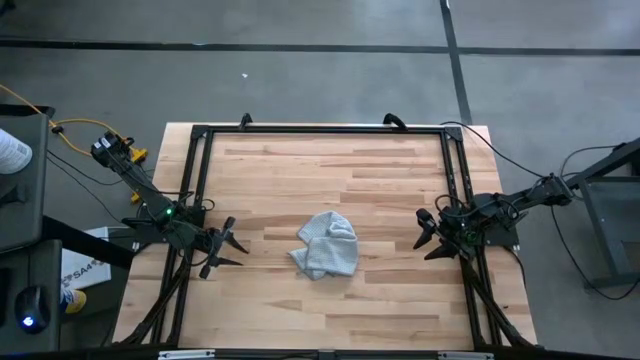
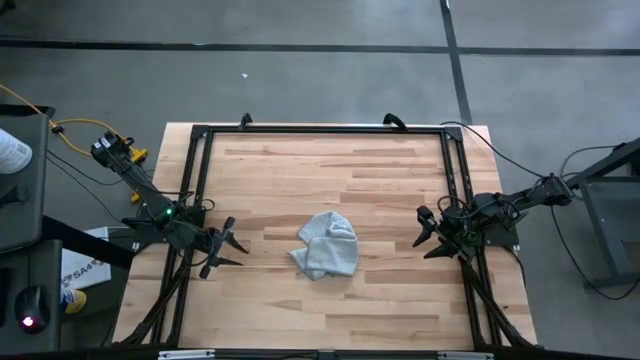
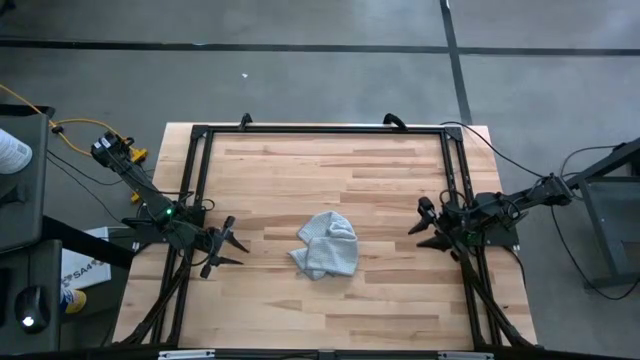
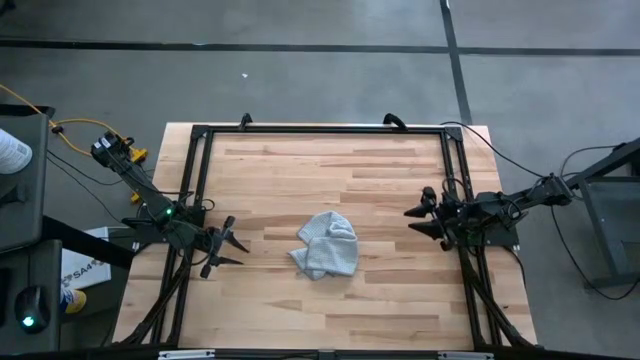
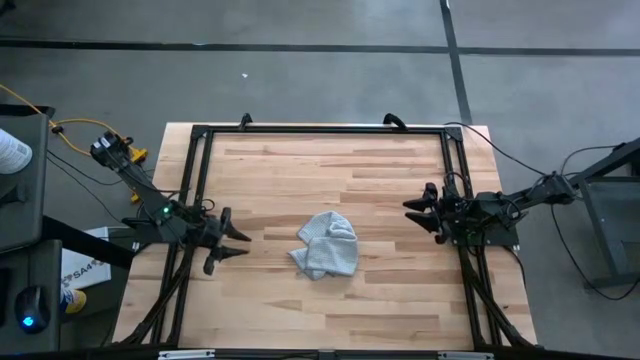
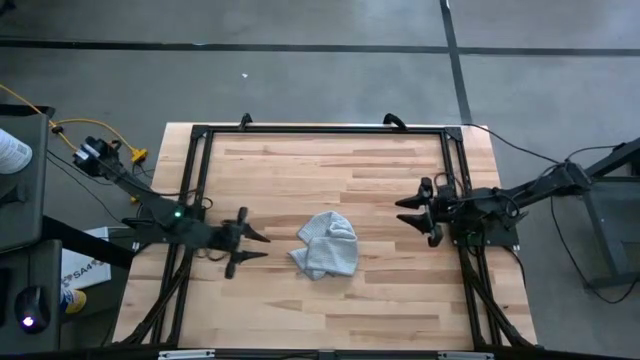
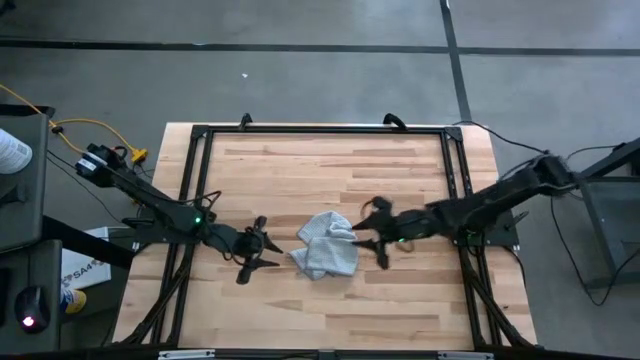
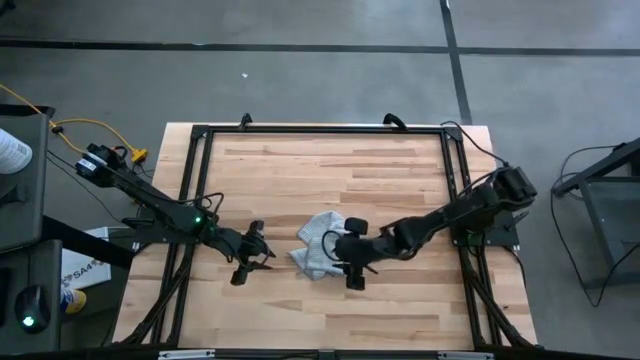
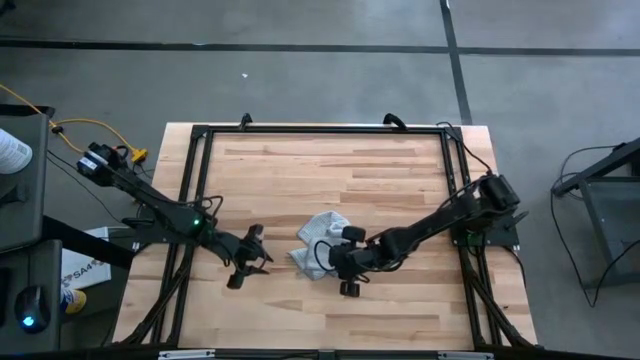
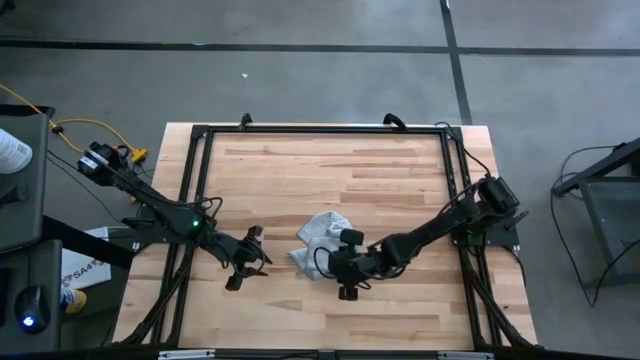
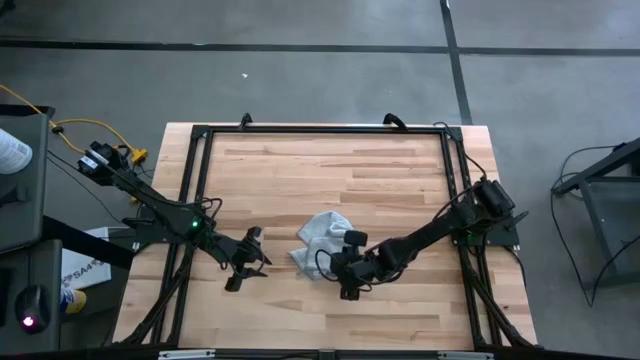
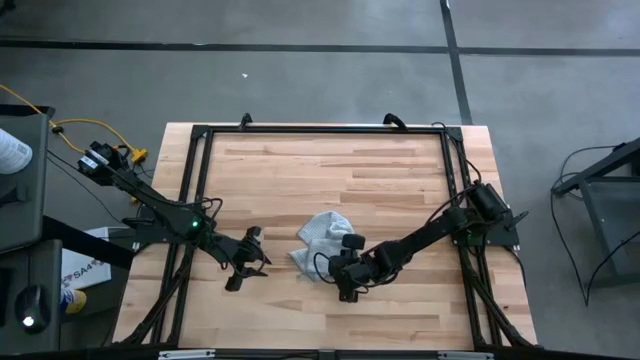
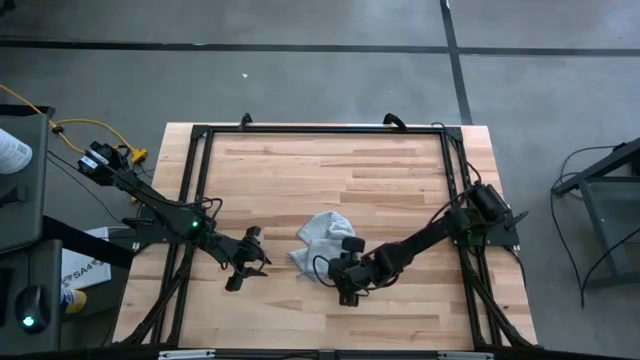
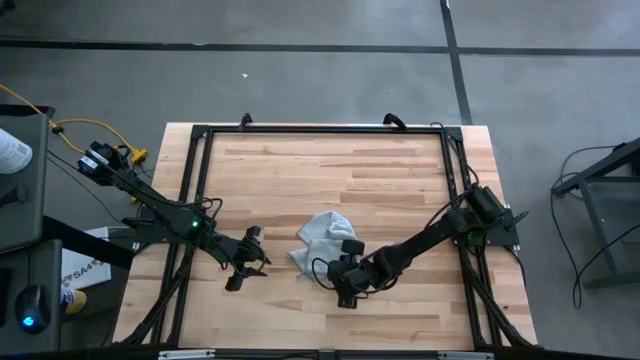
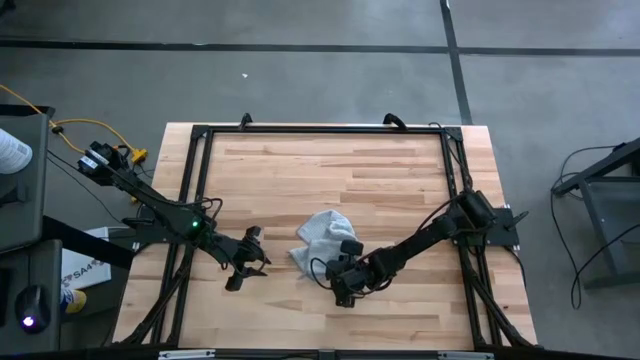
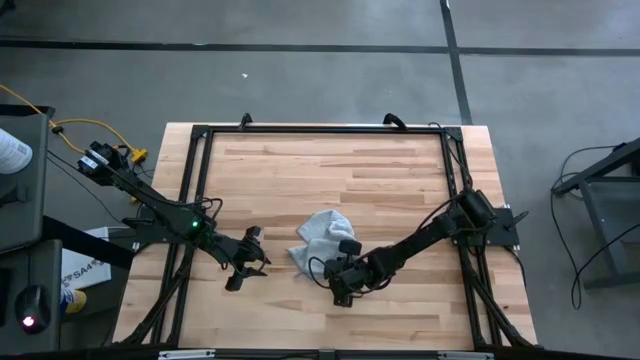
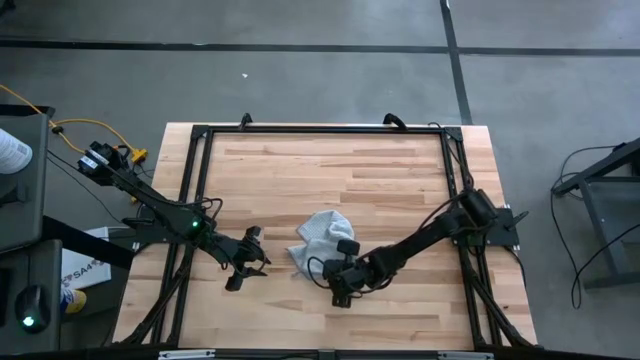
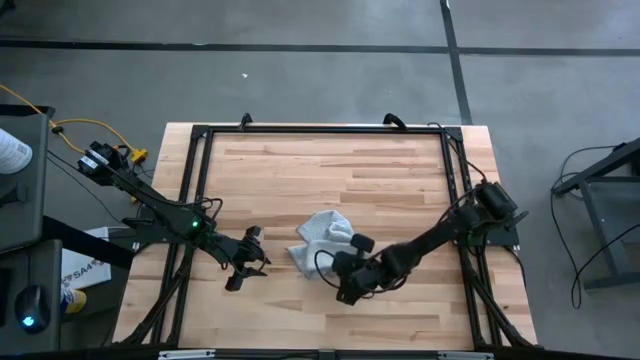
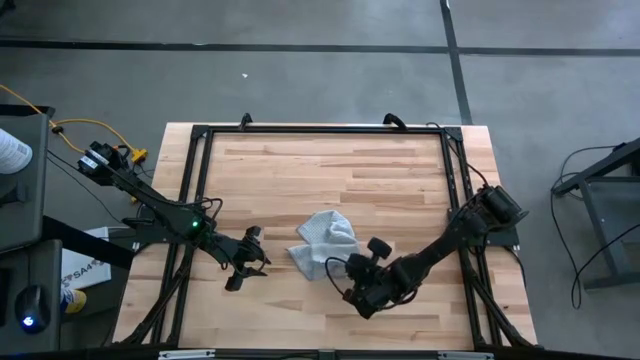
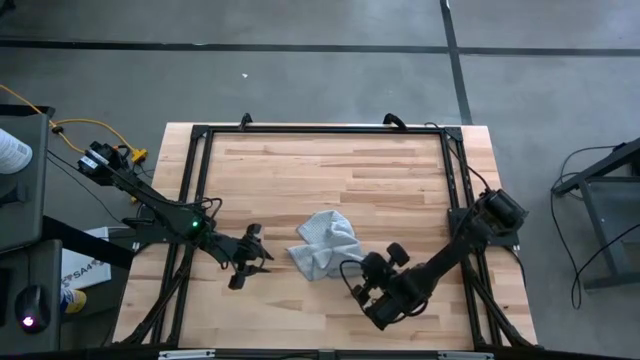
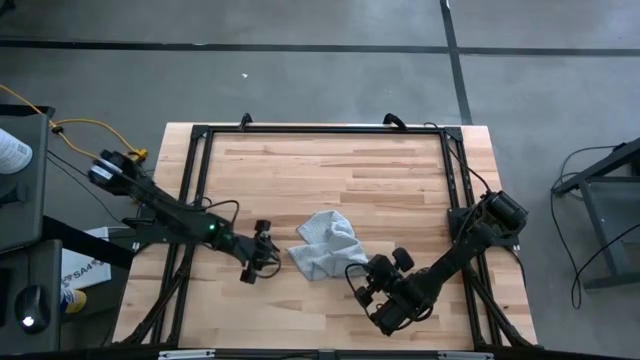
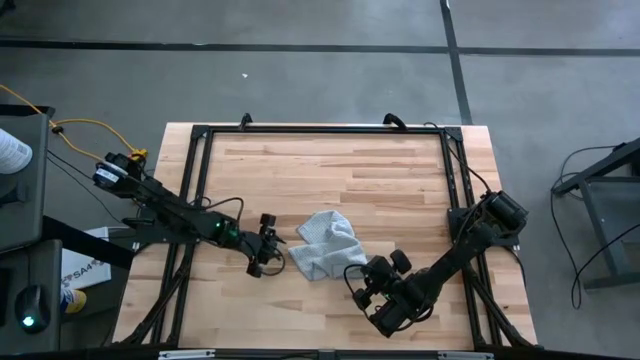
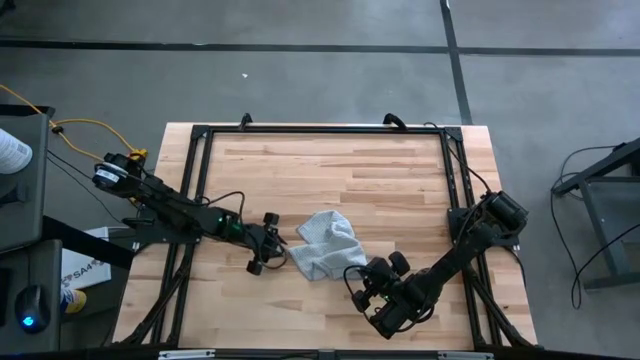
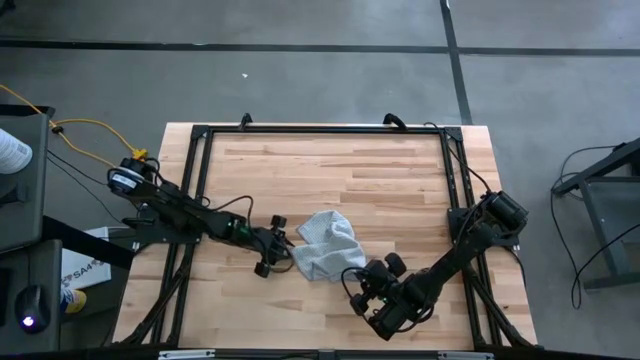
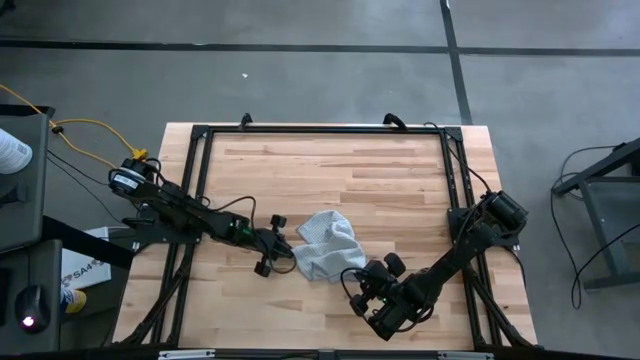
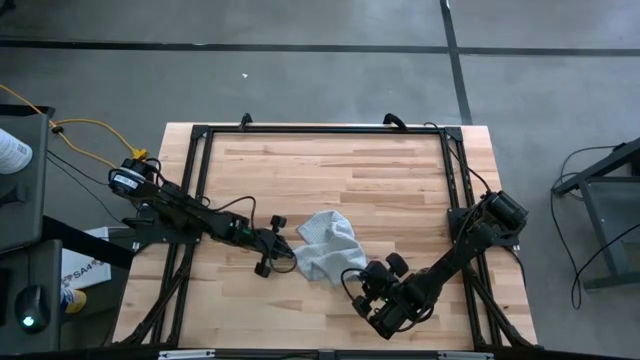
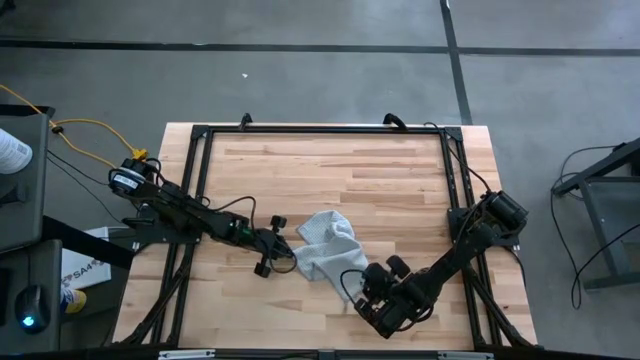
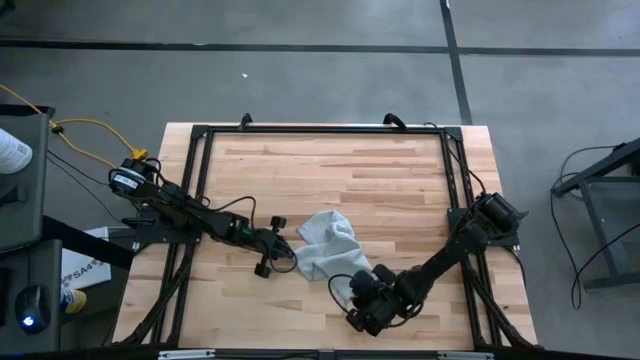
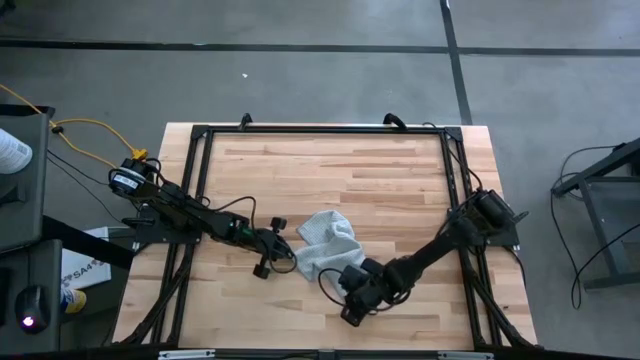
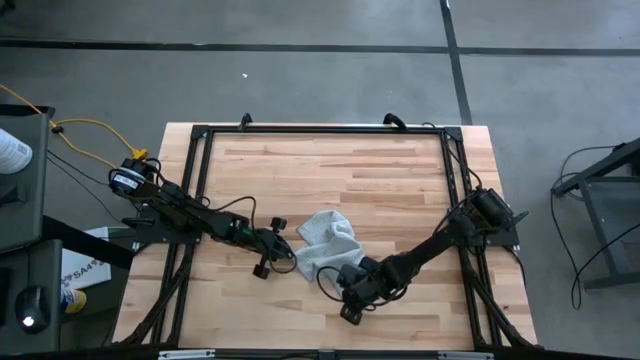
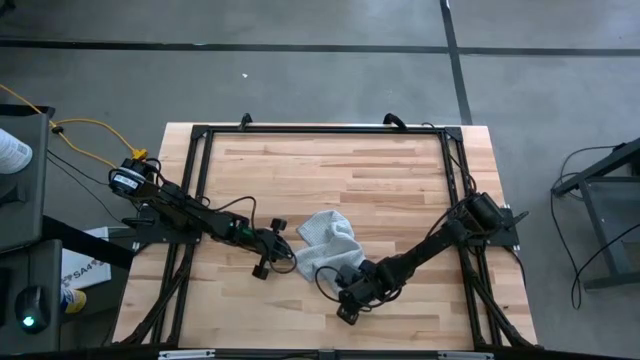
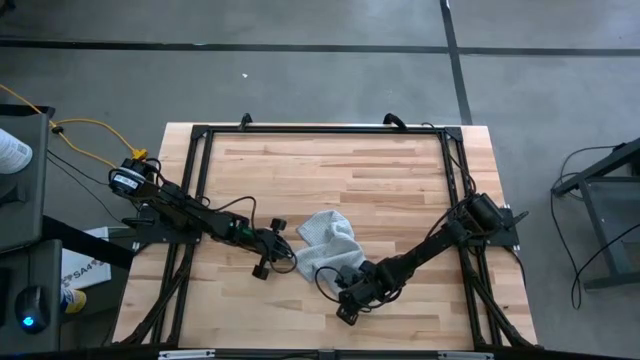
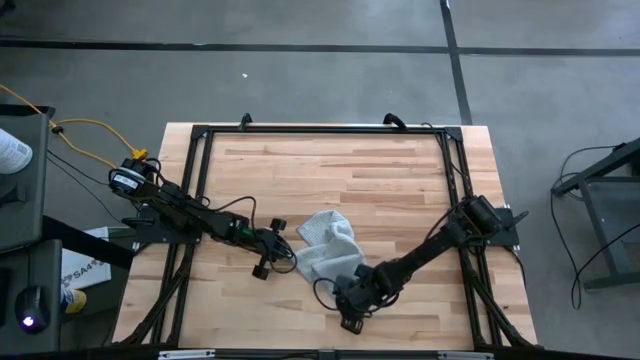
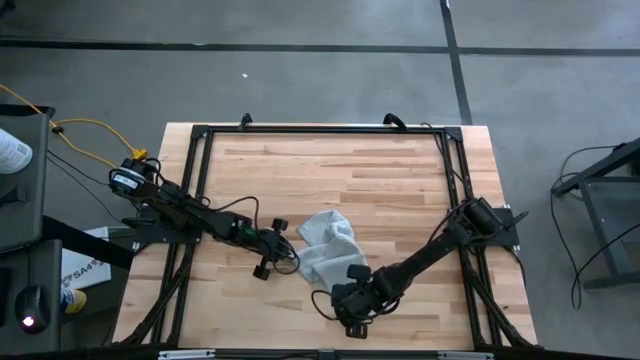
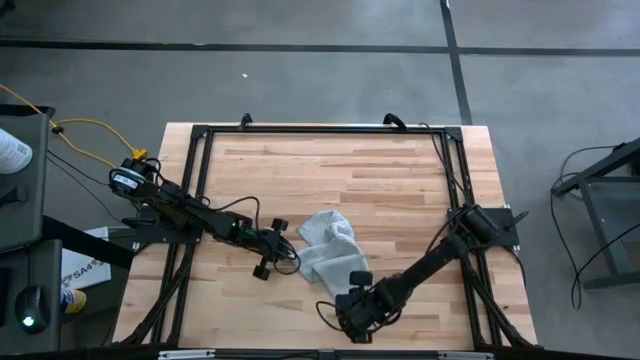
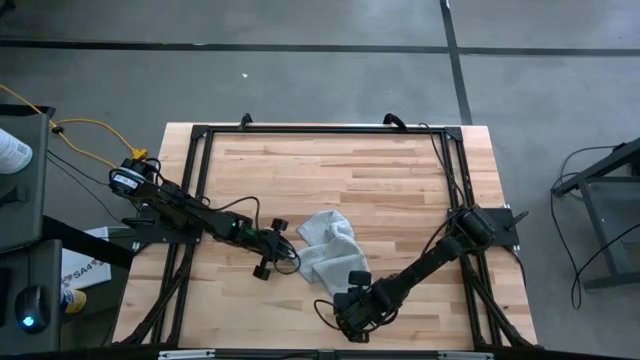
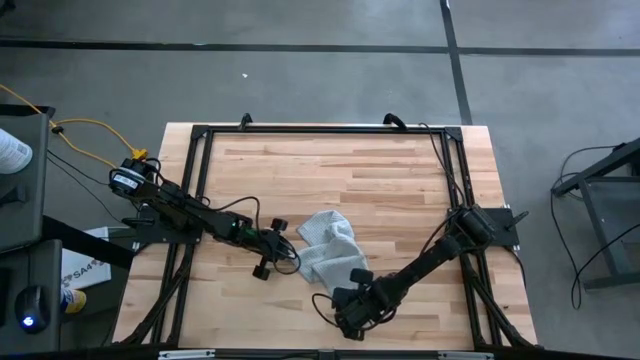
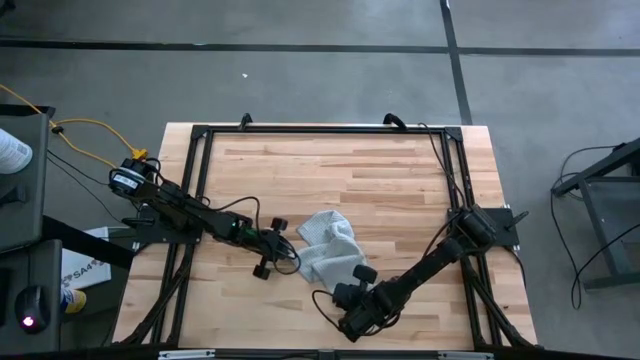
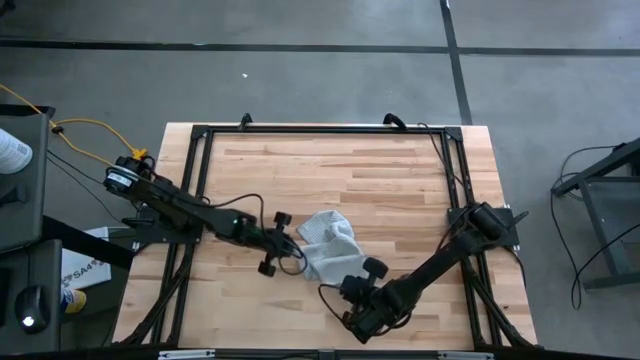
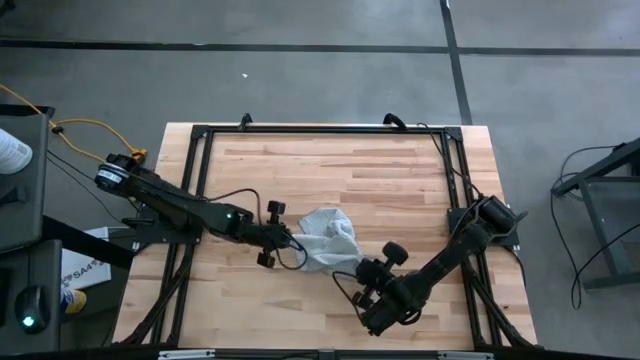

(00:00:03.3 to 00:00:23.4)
Task: Fold microfiber towels
Fold the gray towel
